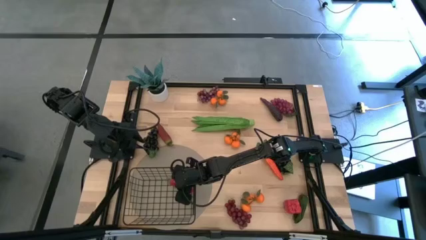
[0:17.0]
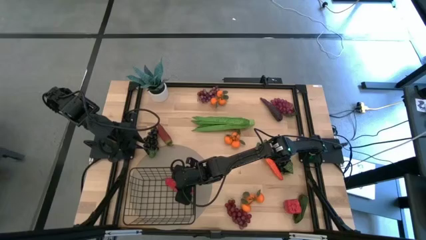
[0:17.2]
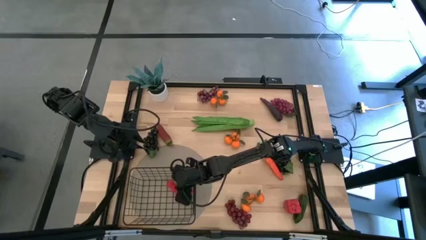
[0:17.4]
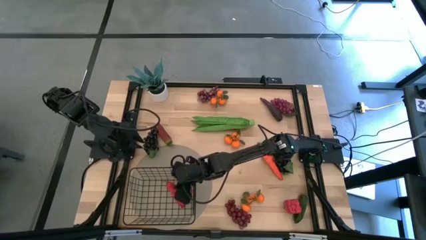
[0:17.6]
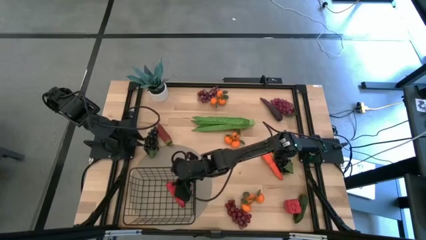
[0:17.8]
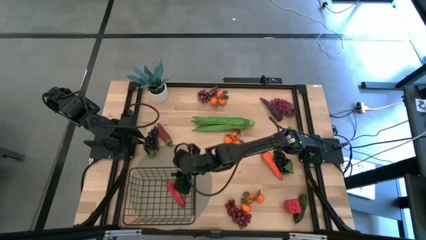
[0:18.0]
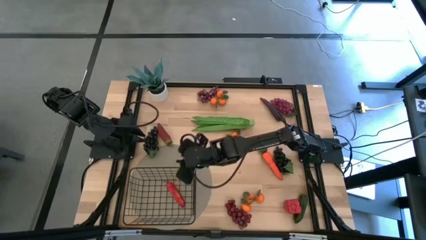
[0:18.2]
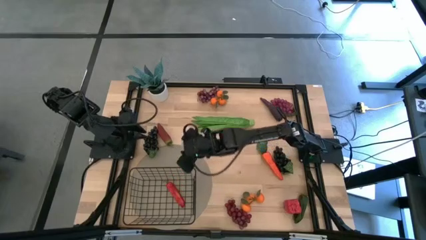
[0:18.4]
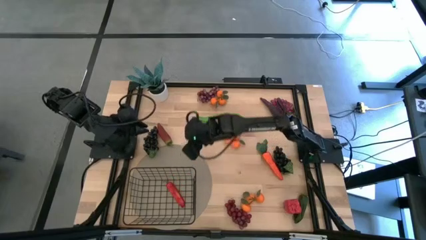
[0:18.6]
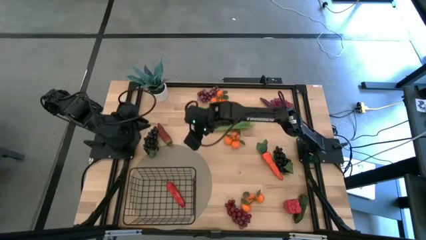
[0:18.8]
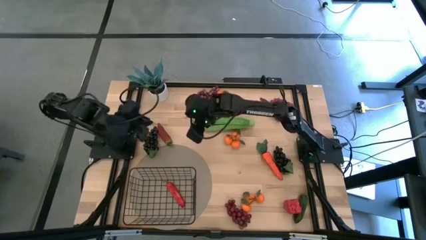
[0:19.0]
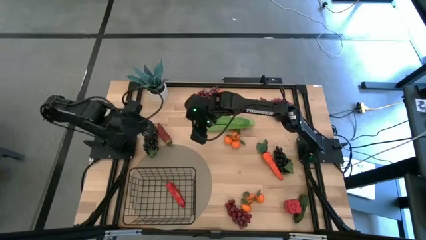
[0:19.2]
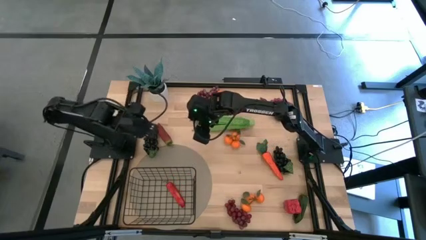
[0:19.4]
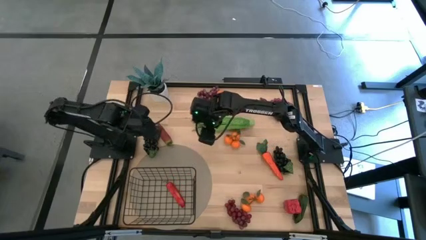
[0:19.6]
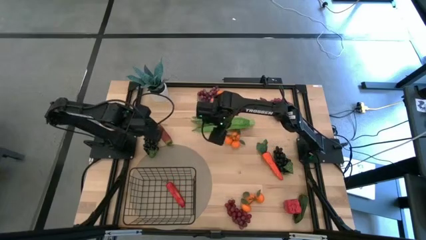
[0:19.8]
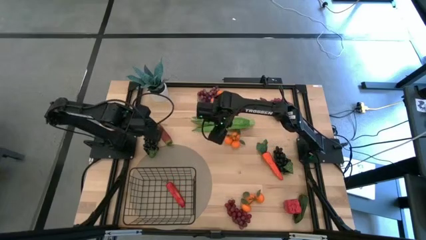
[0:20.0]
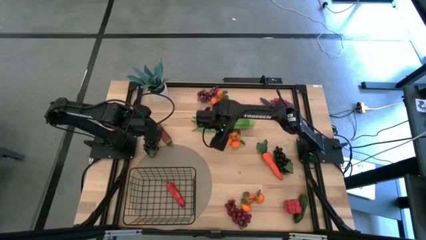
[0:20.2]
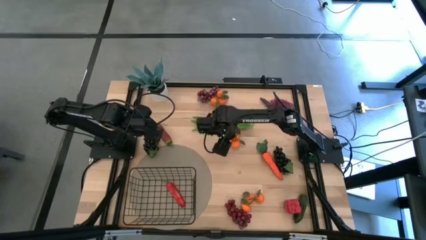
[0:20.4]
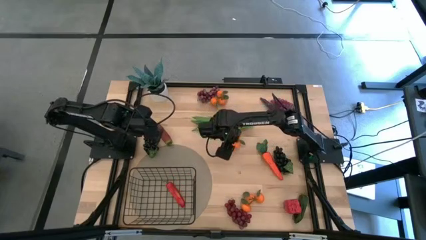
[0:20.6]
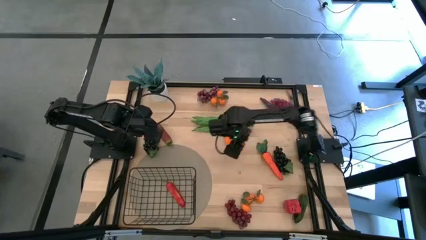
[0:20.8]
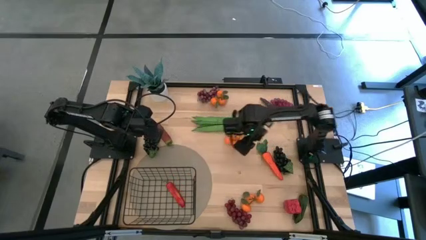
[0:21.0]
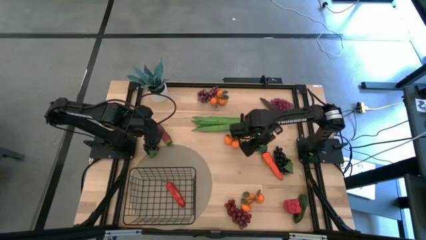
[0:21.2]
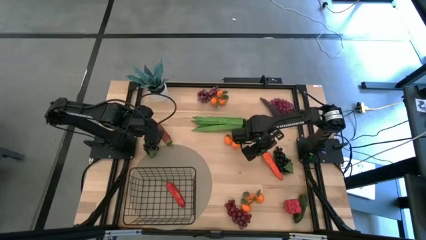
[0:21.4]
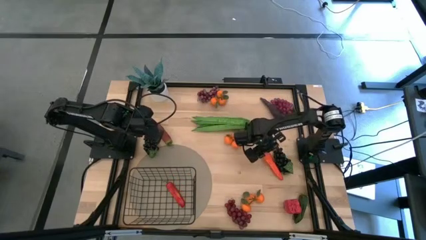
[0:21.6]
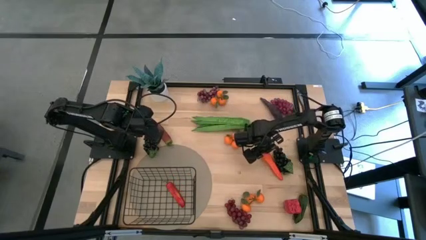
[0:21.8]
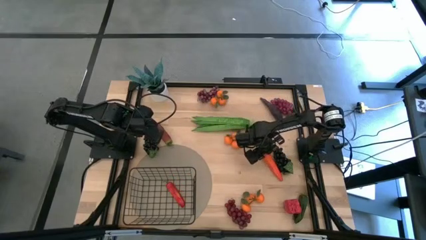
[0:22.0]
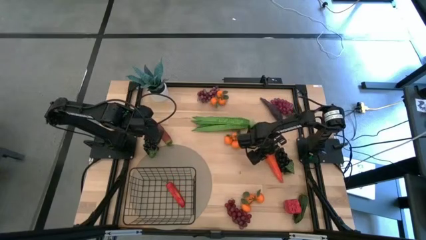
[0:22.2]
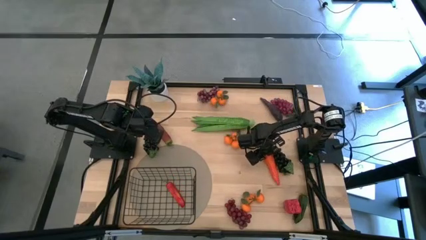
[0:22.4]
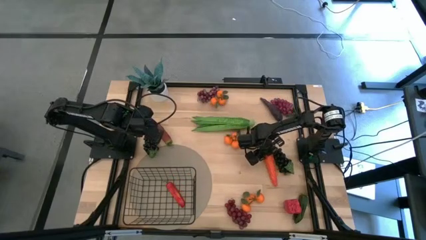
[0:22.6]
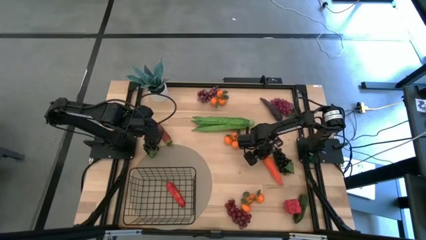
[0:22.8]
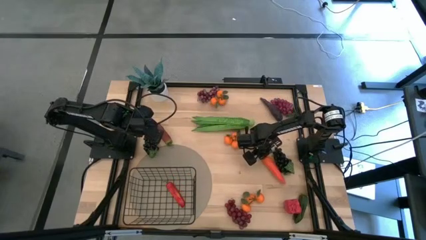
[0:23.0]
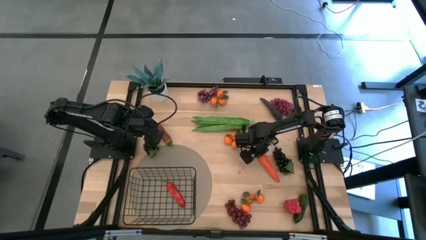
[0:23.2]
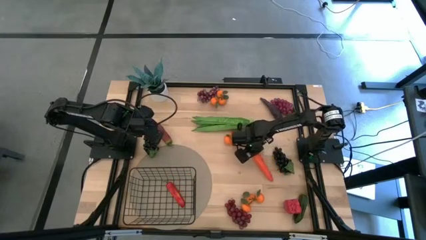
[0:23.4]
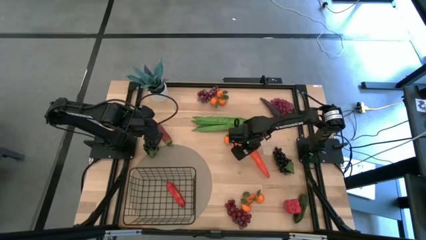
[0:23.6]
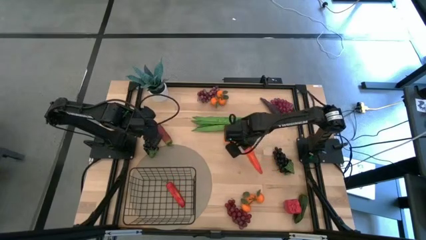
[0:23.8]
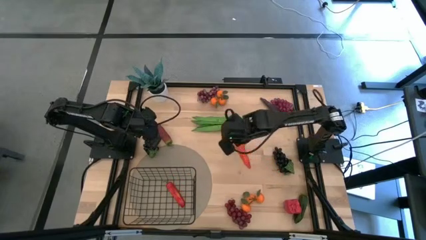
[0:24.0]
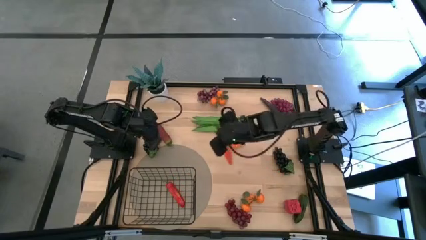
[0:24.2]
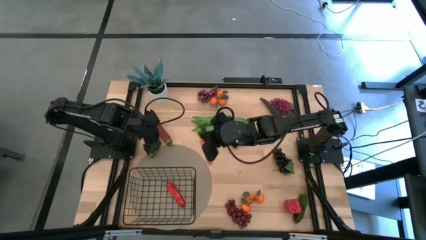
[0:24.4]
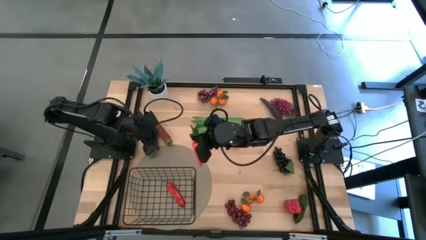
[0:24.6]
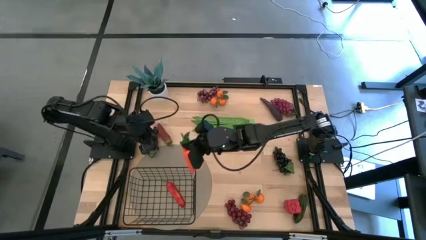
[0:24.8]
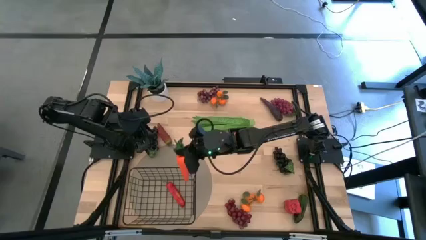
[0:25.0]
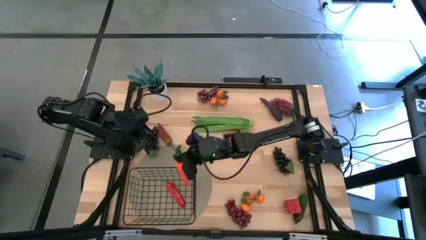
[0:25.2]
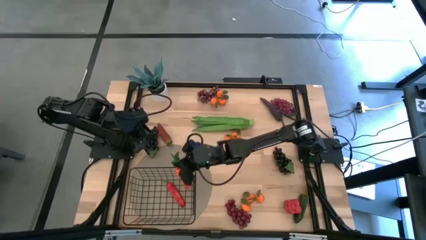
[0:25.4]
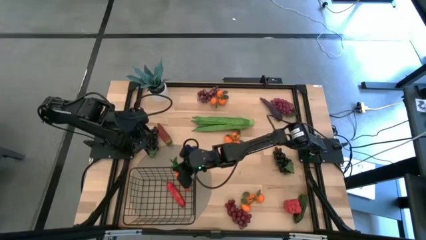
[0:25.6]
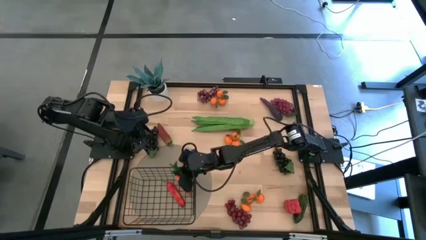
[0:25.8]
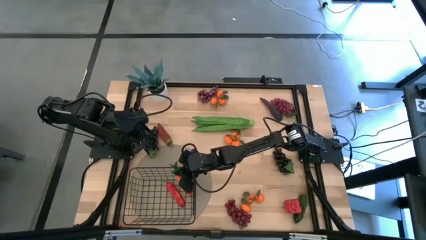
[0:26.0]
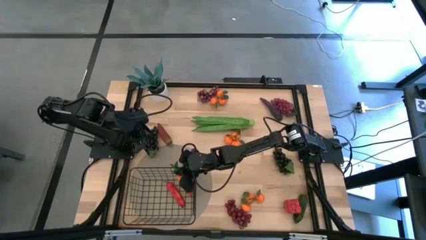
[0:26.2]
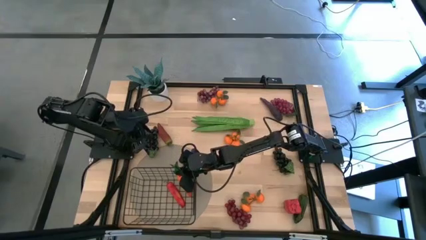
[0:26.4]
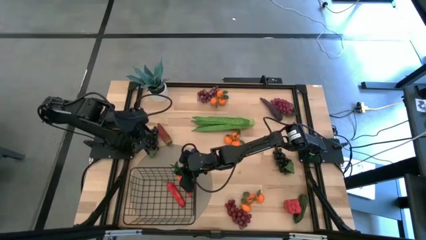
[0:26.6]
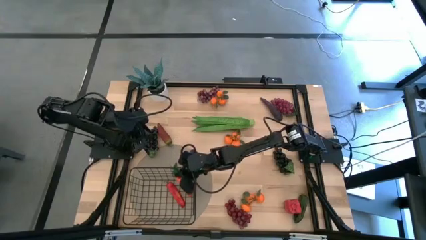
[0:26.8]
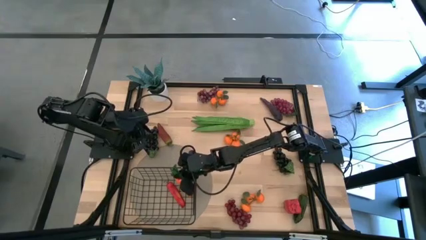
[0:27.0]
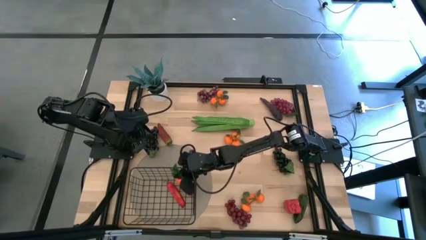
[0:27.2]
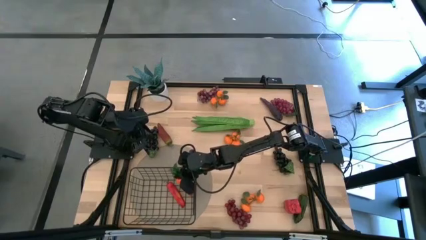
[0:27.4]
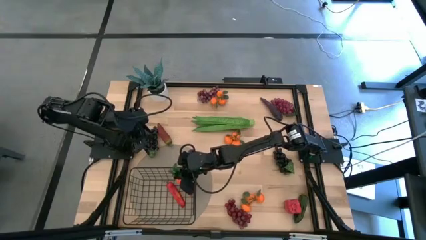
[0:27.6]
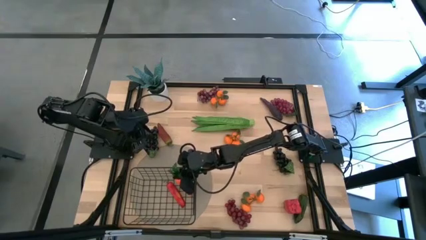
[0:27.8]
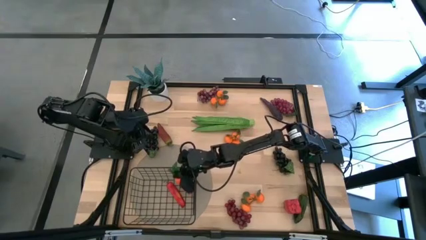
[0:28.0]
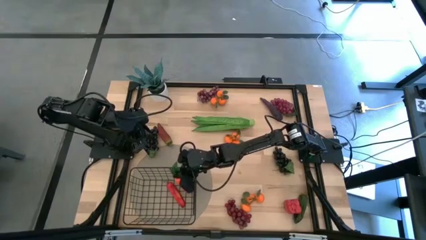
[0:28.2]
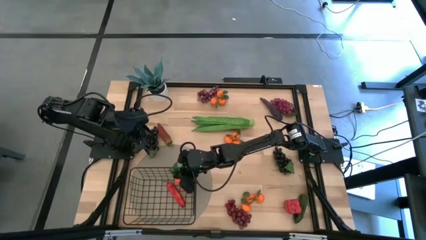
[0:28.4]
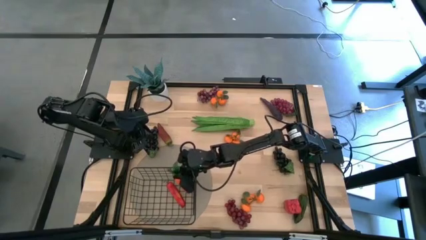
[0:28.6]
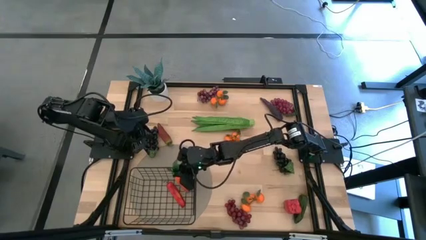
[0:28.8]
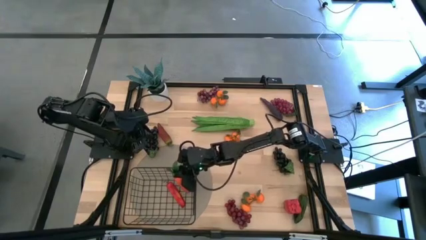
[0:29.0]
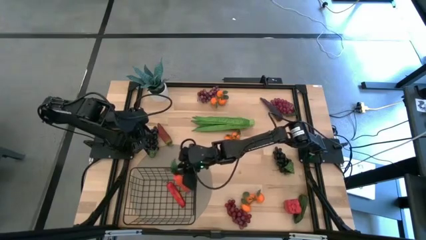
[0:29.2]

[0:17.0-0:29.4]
Task: Build produce basket
Put the carrot into the wire basket

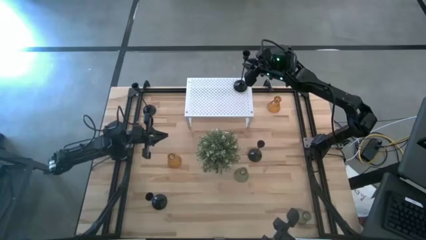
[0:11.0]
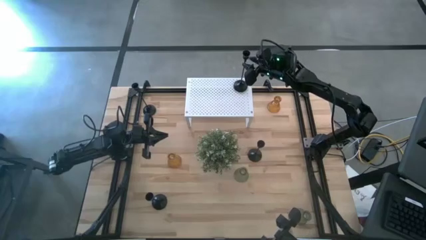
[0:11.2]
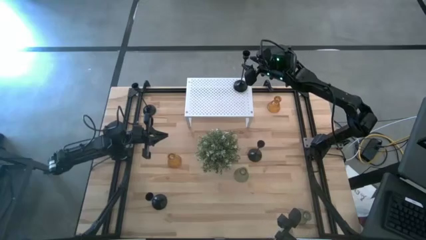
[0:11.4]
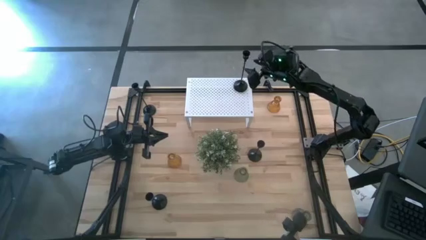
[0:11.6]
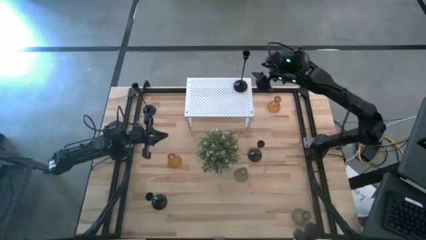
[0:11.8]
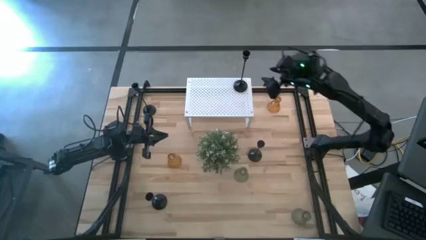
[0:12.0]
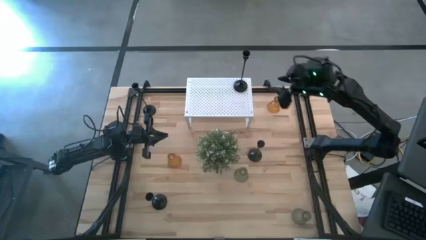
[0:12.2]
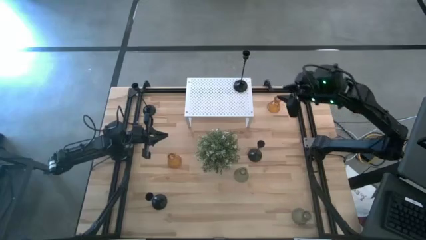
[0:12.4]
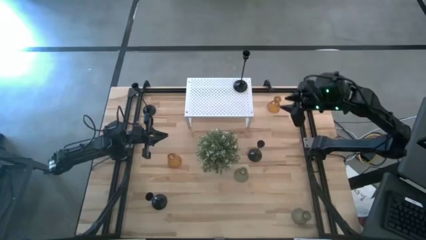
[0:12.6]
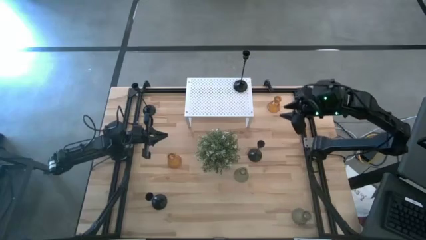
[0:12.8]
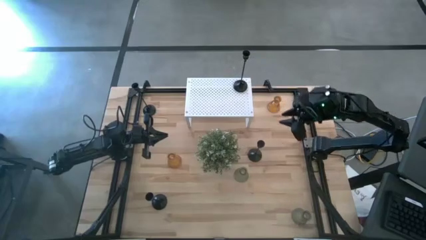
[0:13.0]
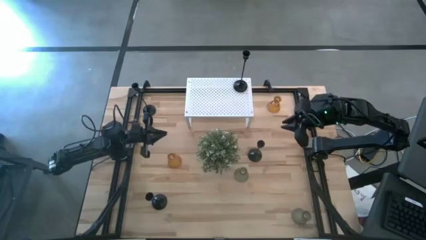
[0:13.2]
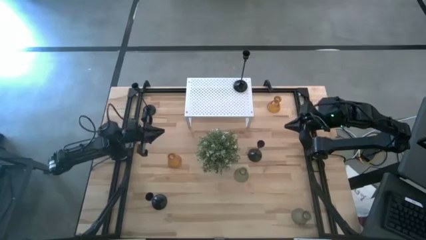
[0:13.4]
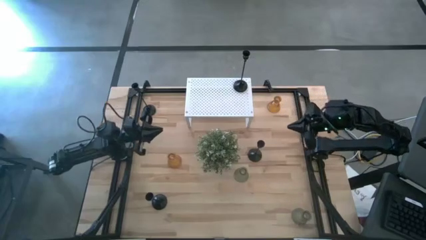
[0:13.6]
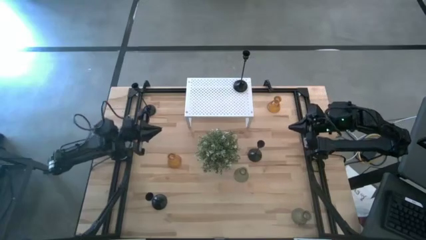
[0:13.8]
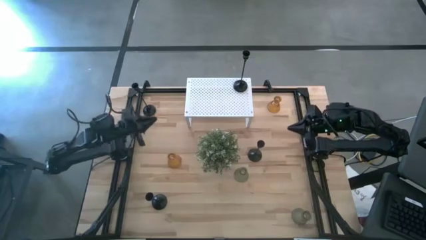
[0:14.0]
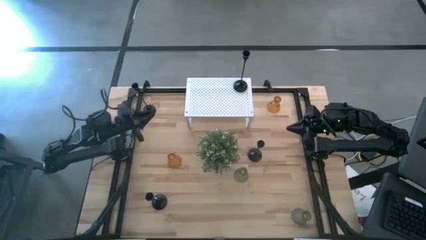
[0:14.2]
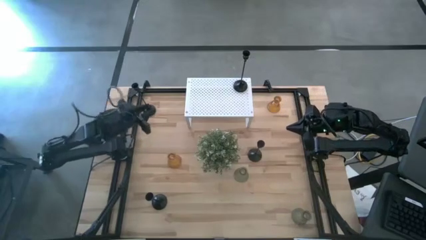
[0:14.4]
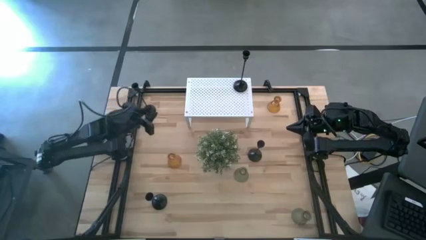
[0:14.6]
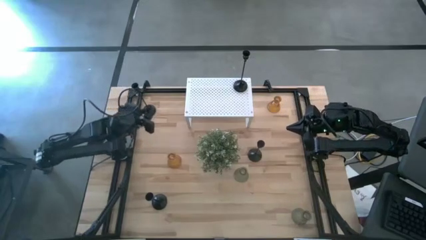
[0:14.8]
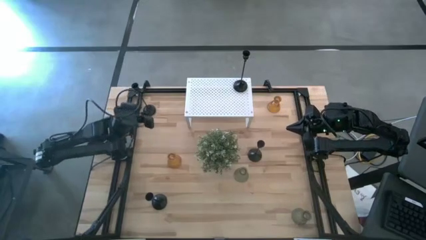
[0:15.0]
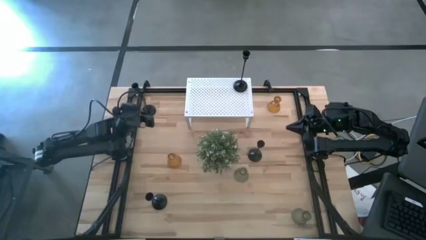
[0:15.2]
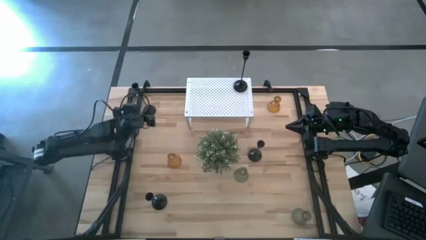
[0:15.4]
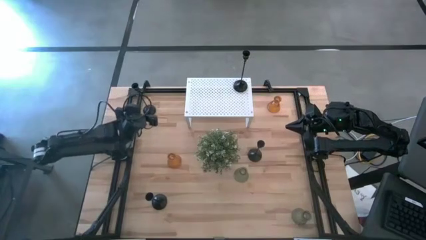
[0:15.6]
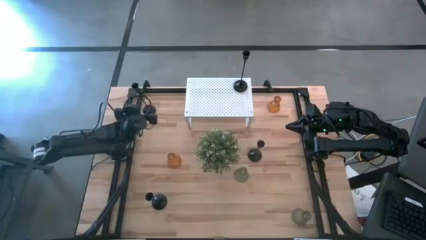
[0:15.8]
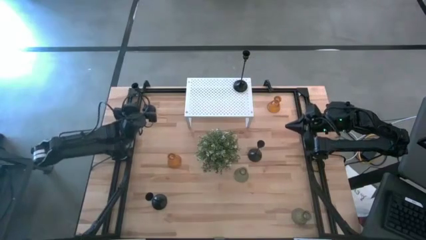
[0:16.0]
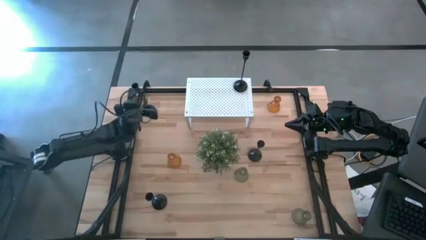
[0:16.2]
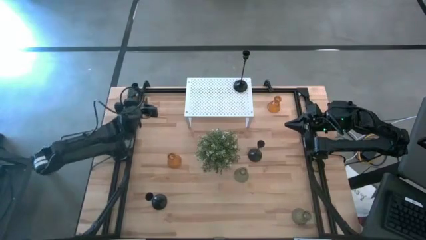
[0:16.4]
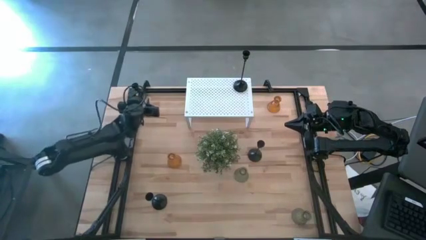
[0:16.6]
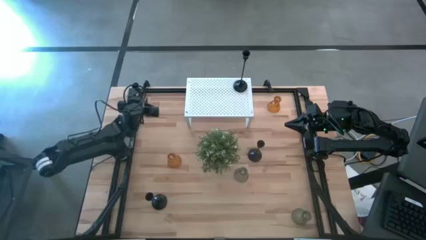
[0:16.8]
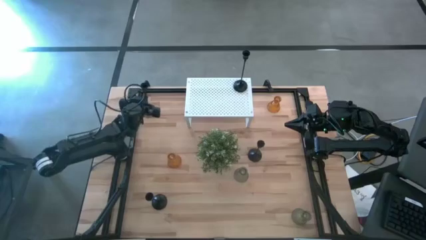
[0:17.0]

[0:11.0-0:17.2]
Task: Pick & Place candle stick holders
Put the top left black candle holder on the shelf
